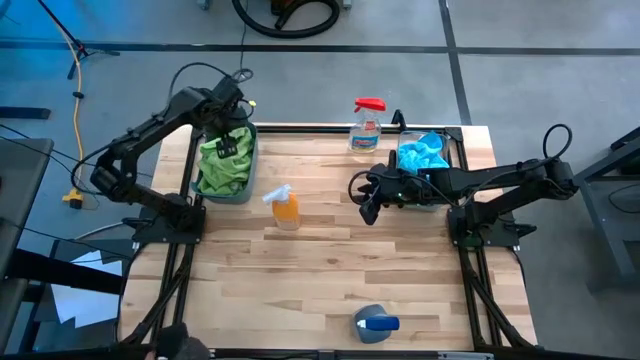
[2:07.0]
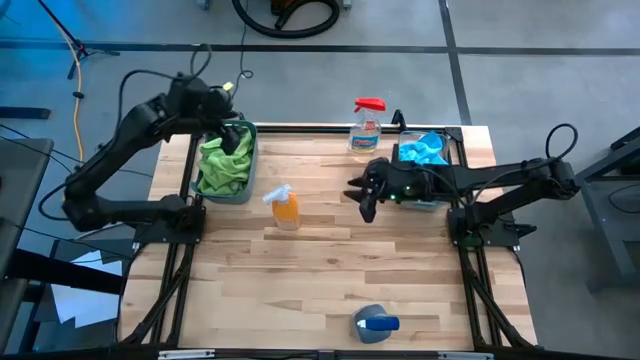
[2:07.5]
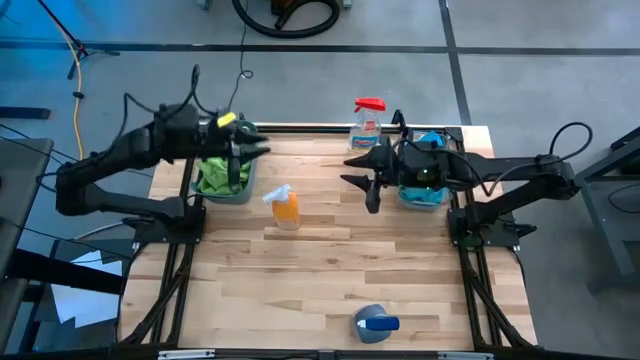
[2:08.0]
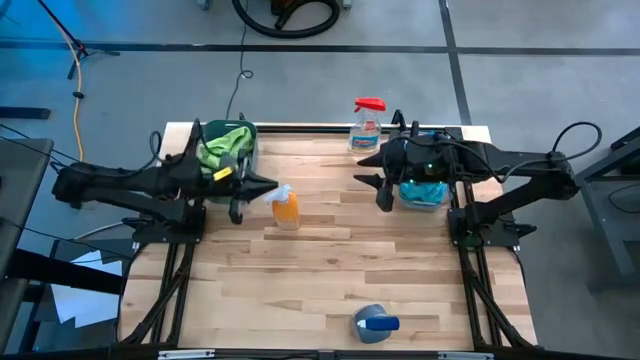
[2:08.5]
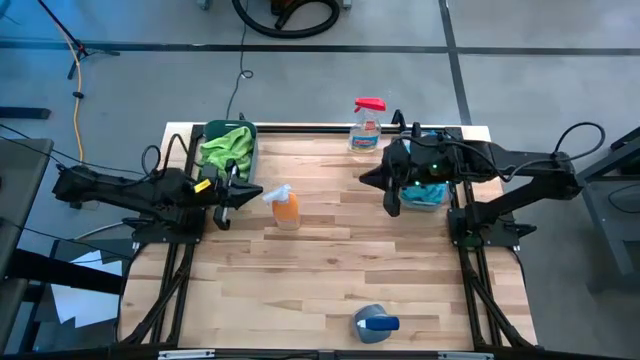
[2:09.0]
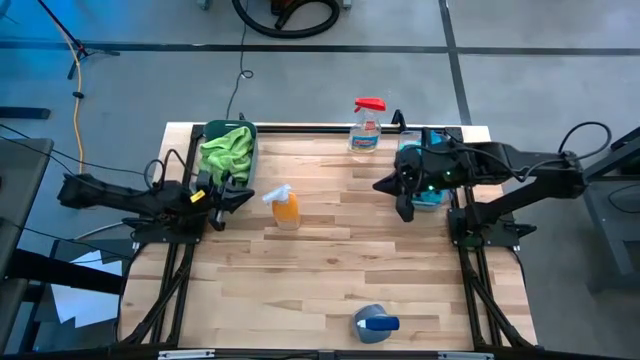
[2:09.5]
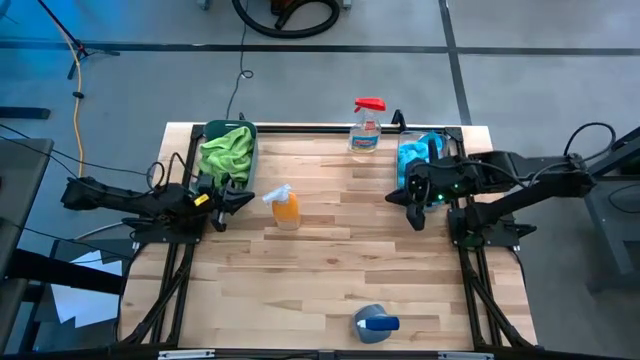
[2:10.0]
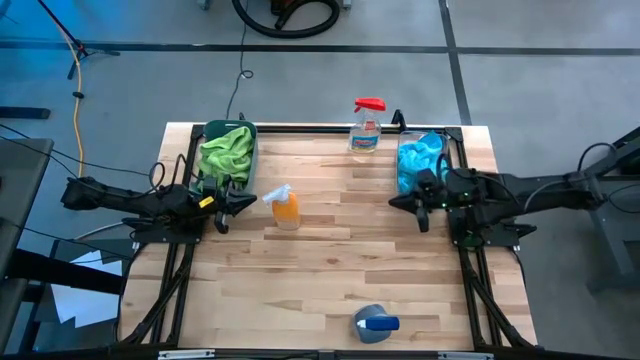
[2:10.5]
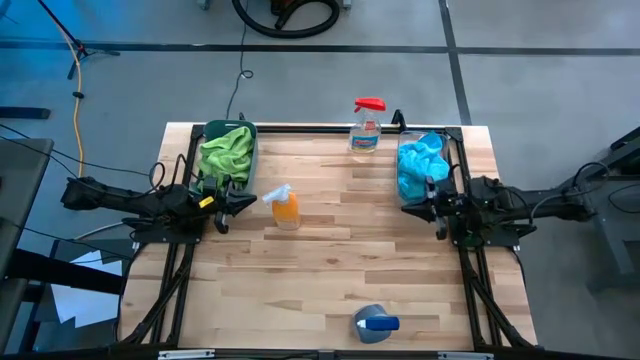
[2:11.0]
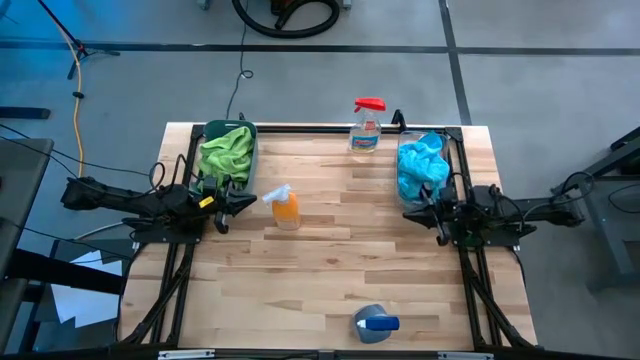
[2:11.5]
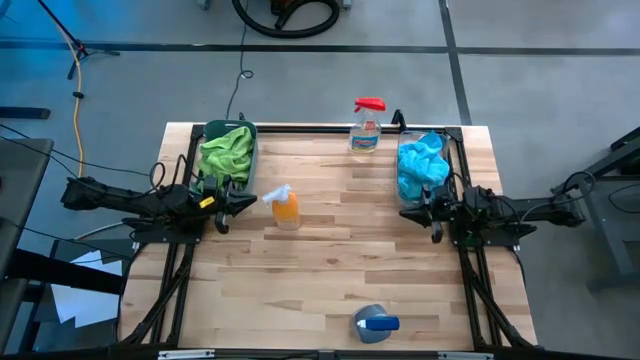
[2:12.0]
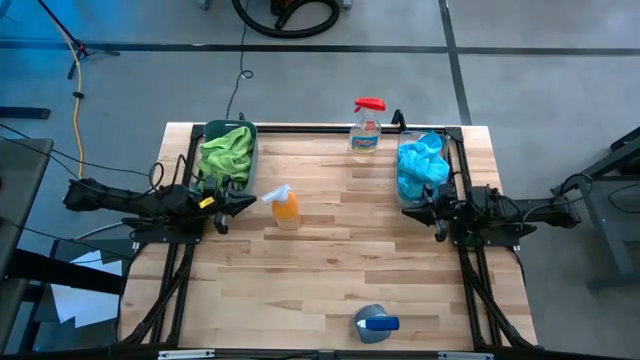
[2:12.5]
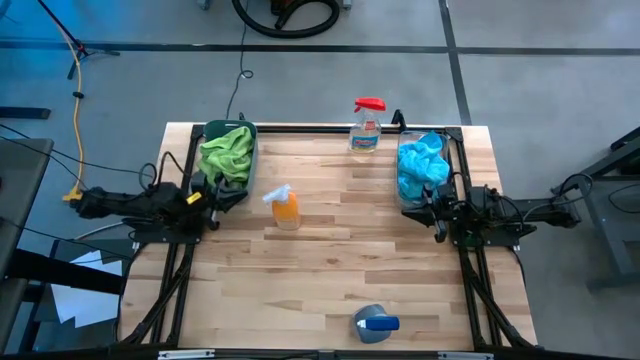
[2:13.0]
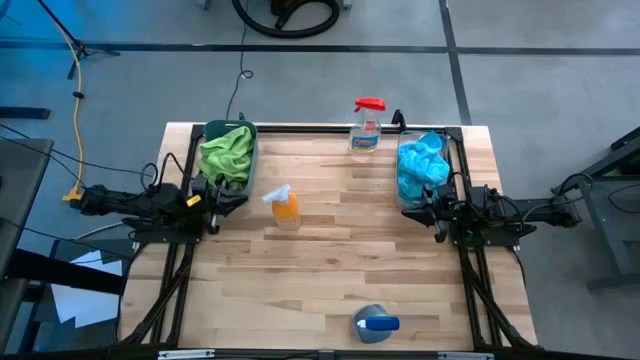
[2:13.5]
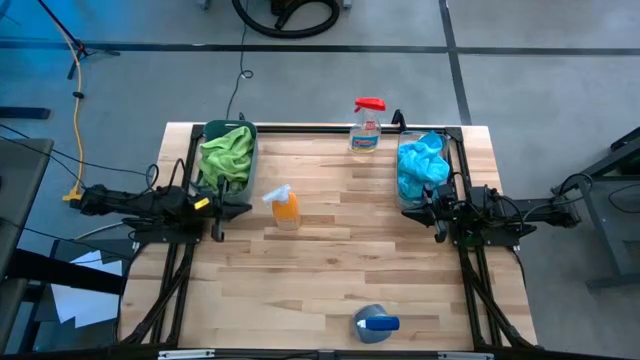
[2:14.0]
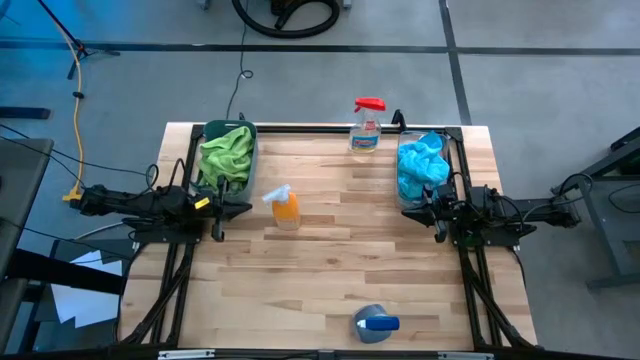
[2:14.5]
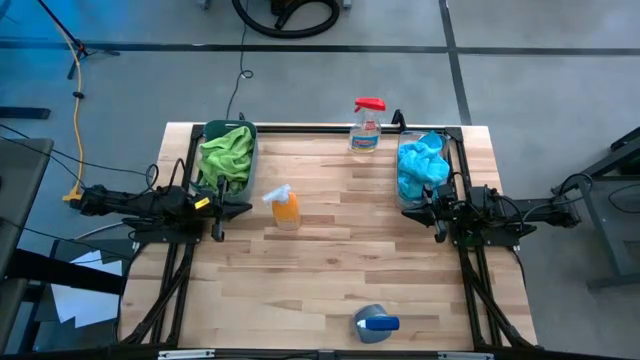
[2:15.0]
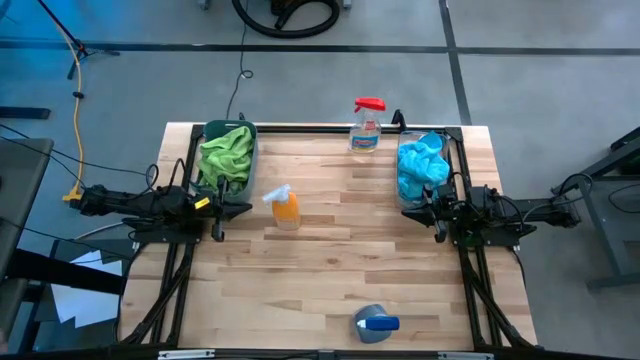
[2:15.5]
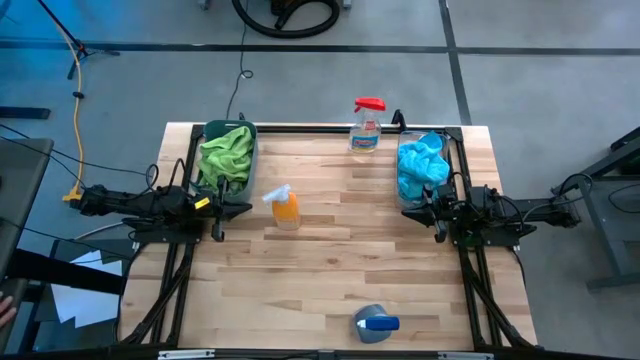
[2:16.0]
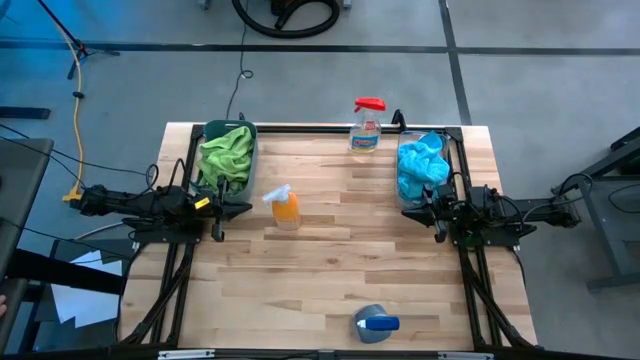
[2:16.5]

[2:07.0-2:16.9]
Task: Sort microfiber towel by color & place in baskets
Return to Home Position

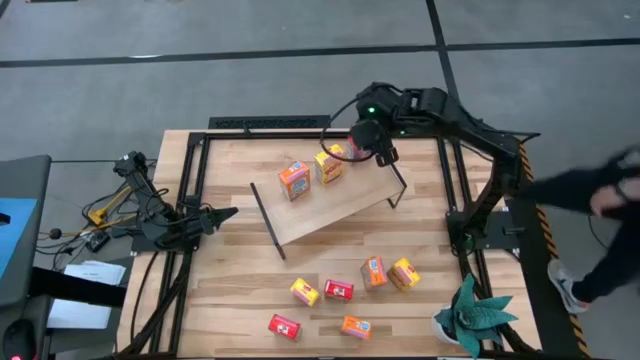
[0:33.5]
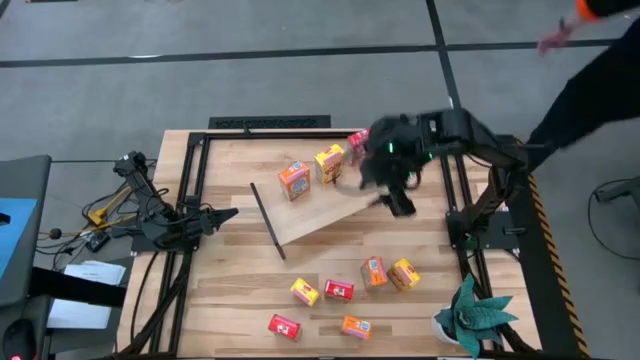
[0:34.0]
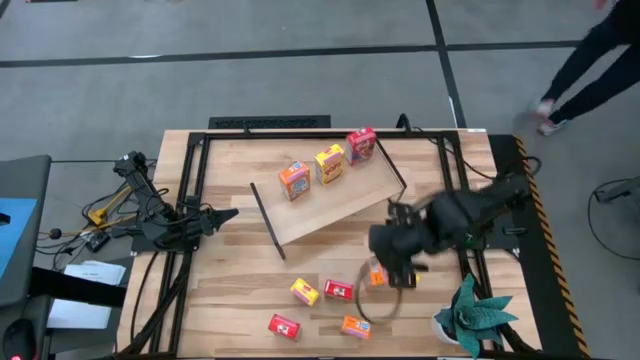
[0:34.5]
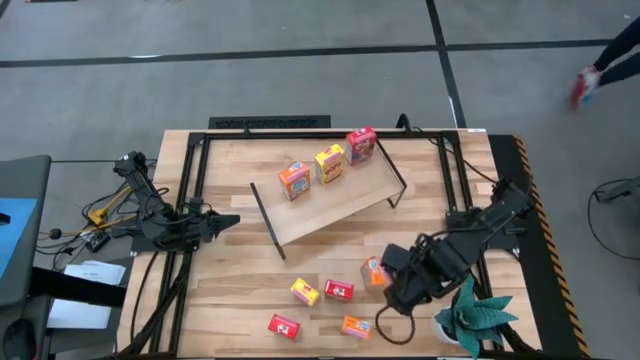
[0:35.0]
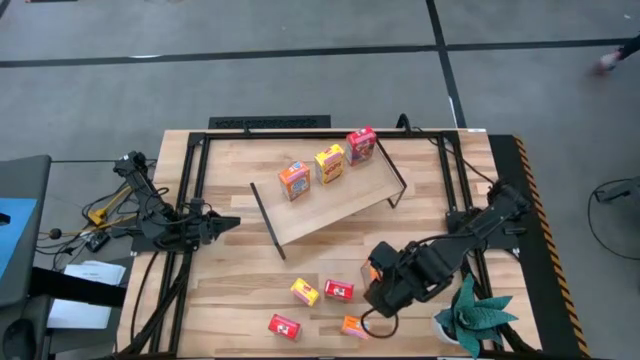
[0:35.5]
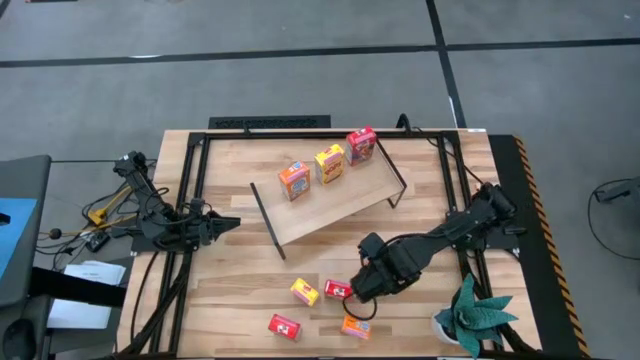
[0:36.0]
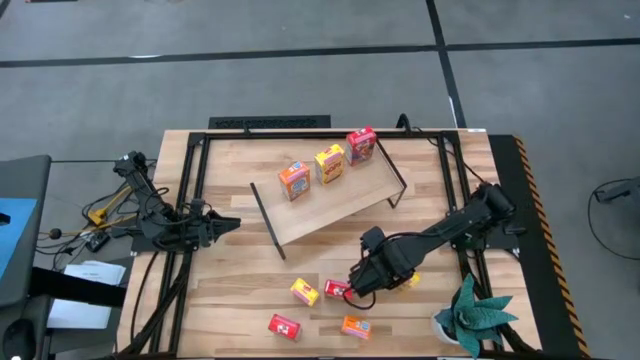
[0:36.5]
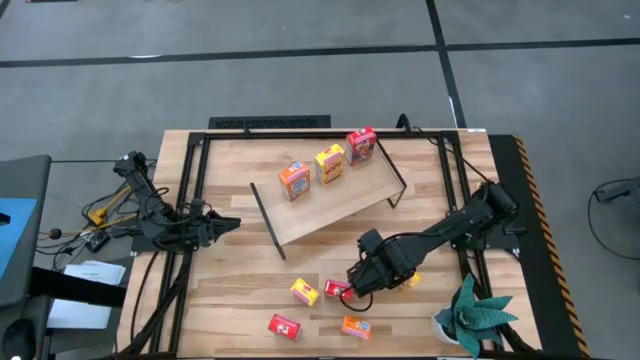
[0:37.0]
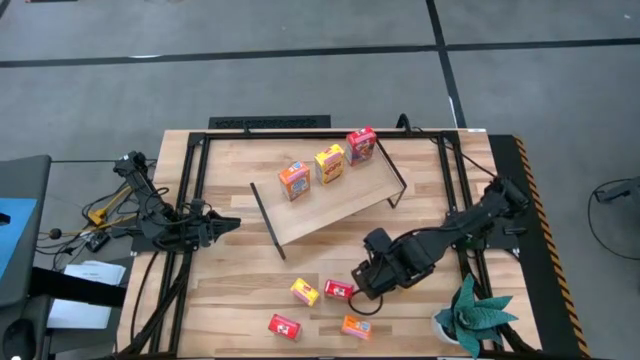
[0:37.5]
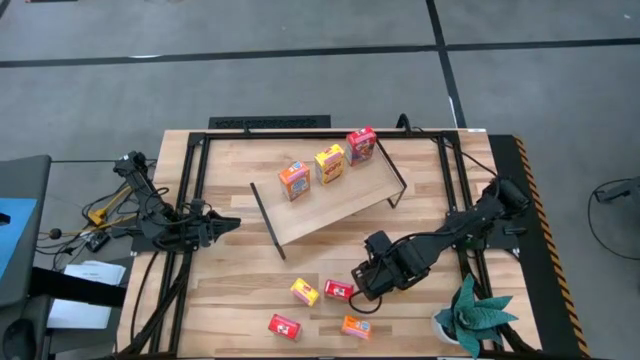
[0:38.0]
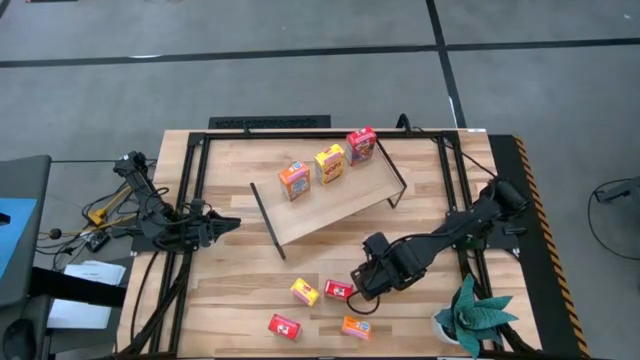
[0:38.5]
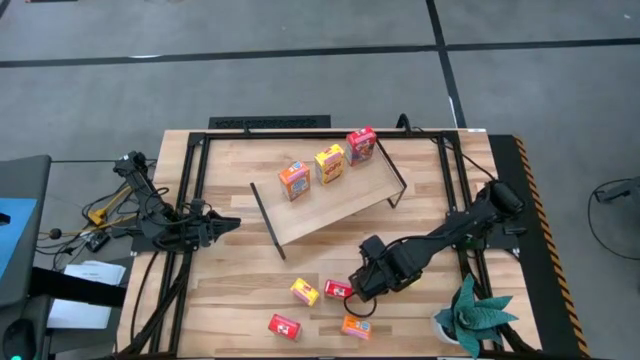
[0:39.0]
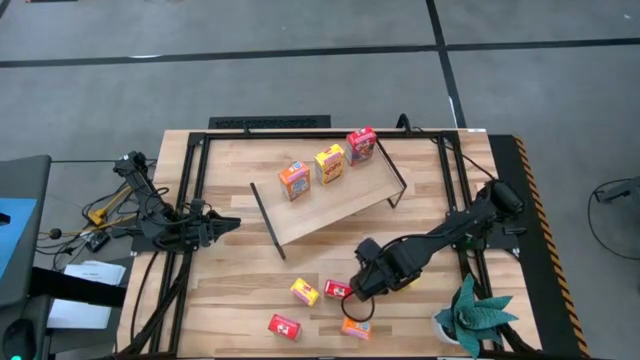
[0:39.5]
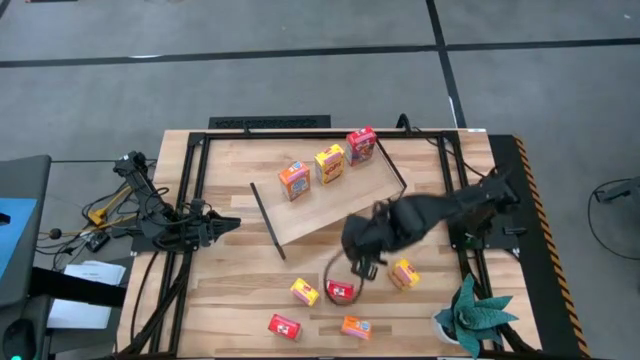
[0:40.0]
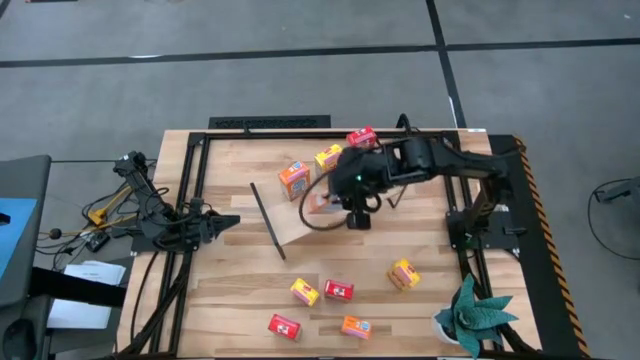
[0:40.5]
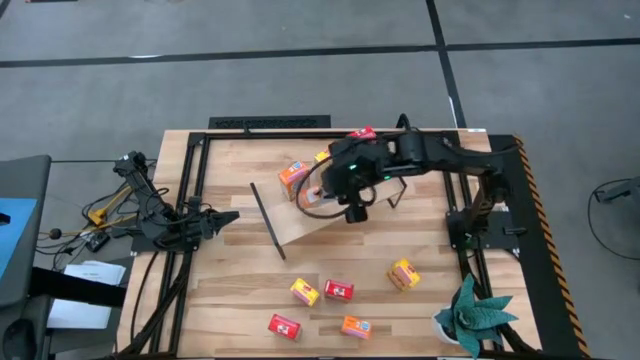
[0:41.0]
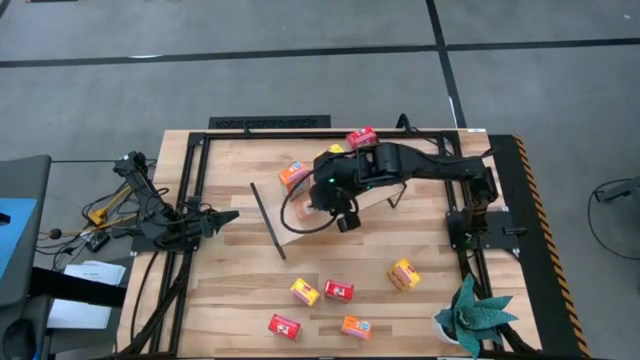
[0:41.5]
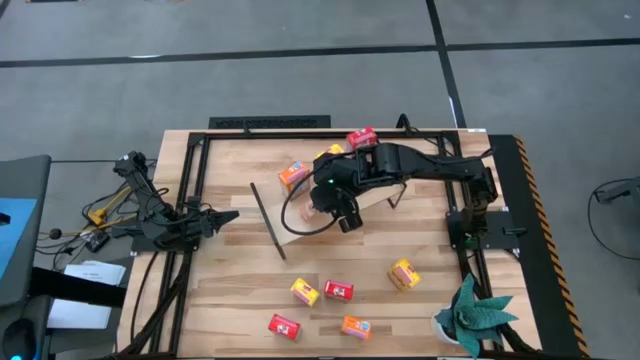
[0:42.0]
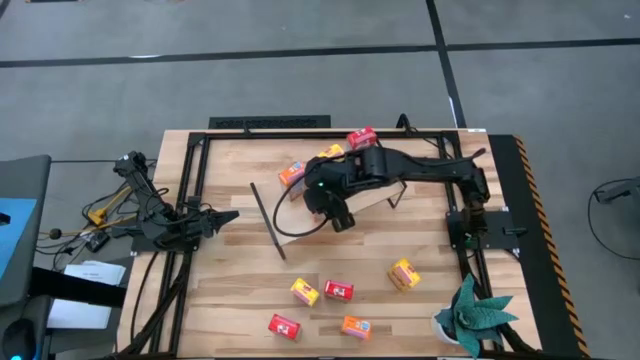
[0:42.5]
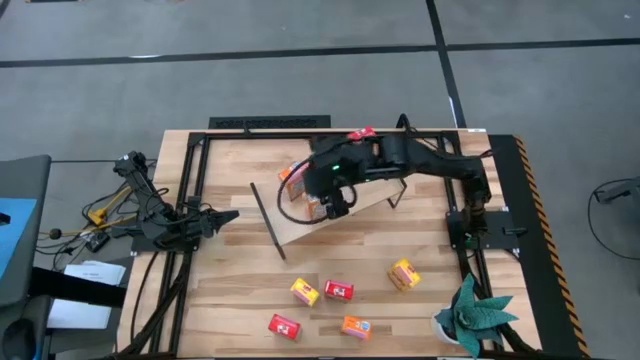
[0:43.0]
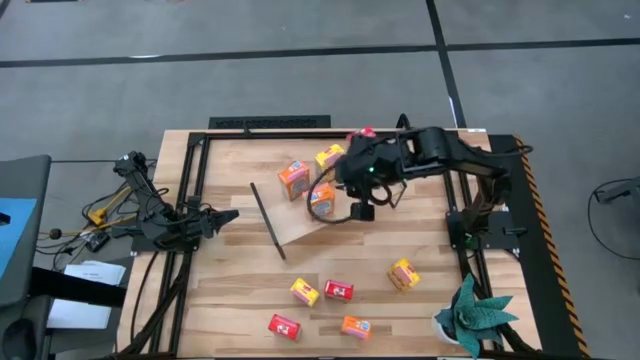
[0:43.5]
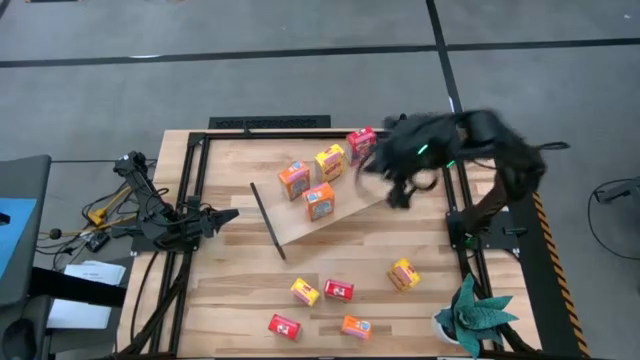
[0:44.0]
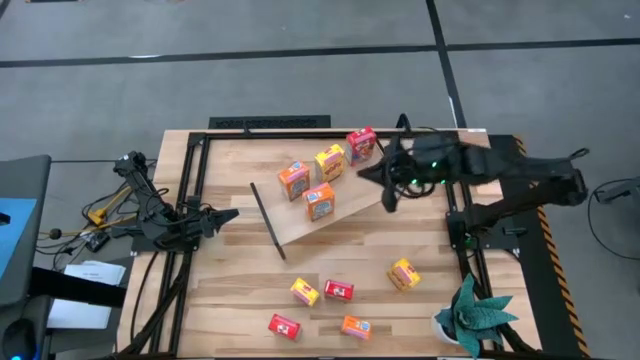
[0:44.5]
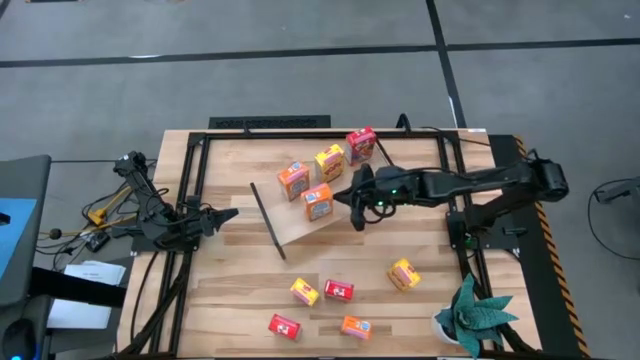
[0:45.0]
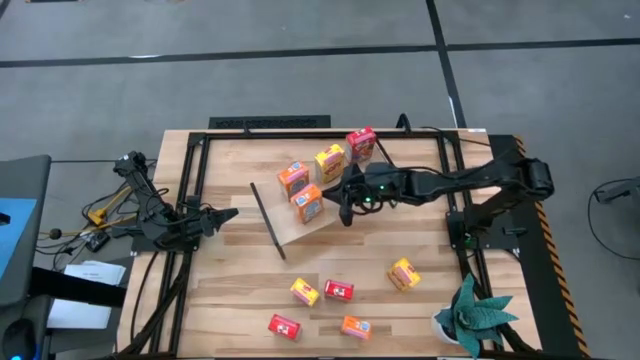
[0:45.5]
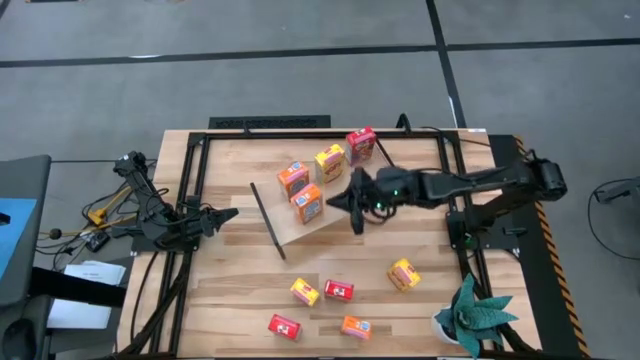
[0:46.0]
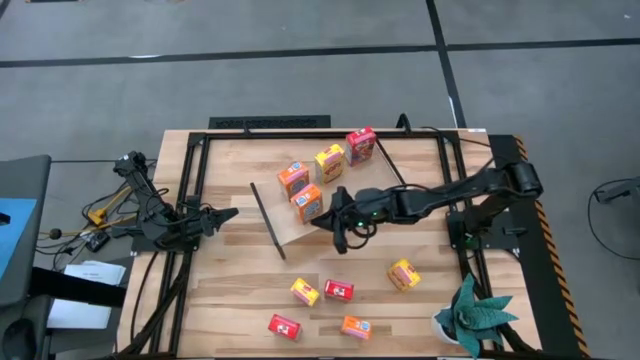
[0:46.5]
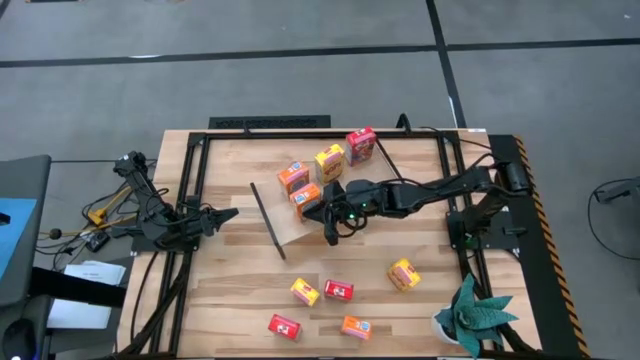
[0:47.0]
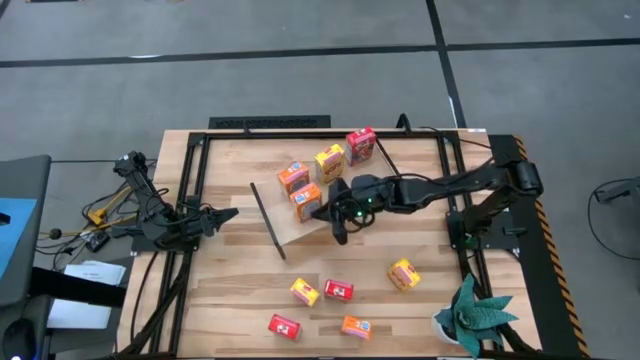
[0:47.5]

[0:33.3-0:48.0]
Task: Stack cereal on shelf
Put the top orange cereal box on the shelf aligned with the other orange cereal box
